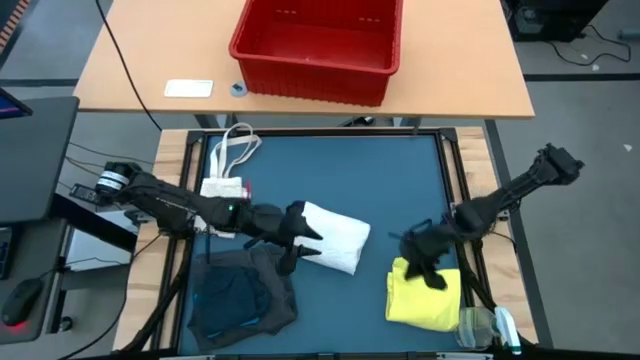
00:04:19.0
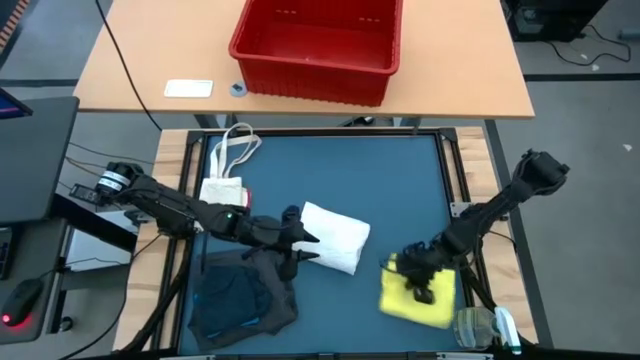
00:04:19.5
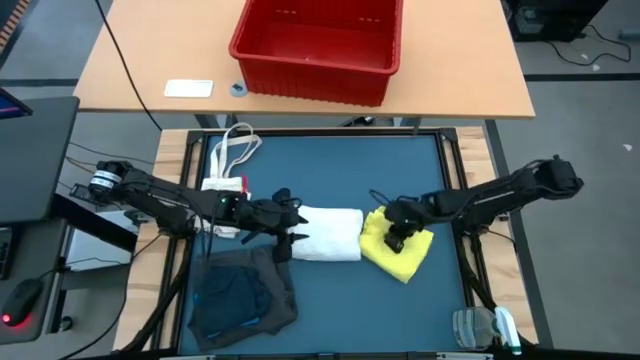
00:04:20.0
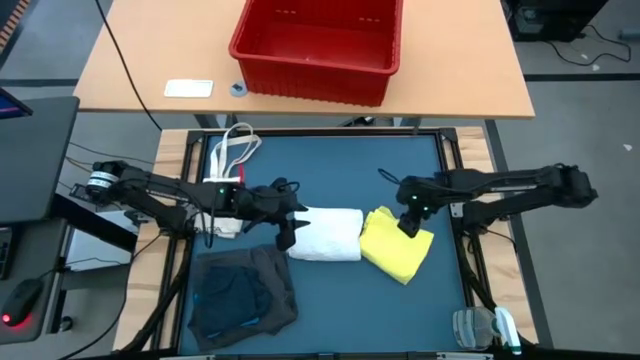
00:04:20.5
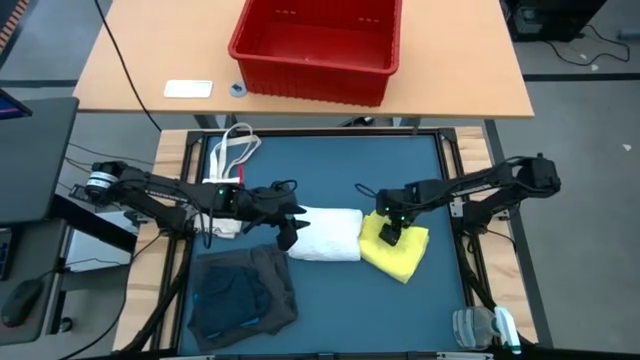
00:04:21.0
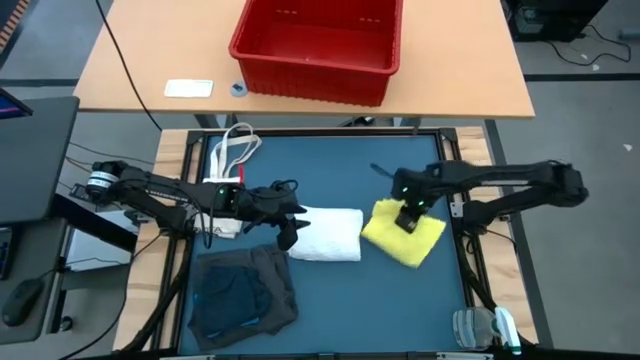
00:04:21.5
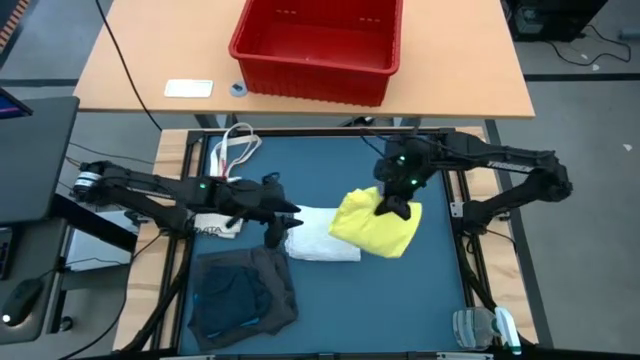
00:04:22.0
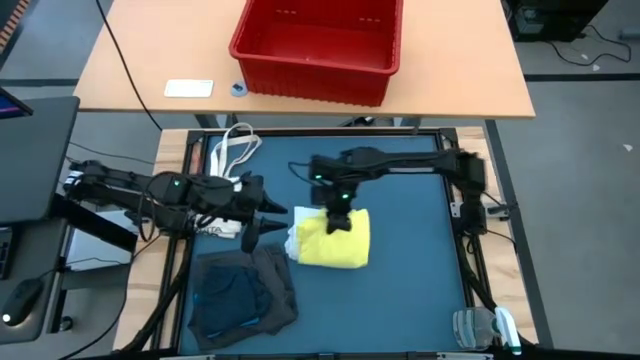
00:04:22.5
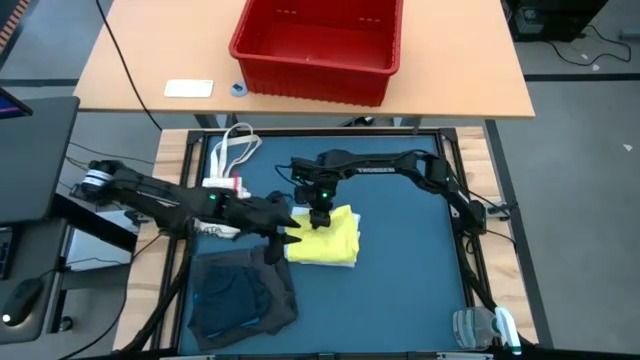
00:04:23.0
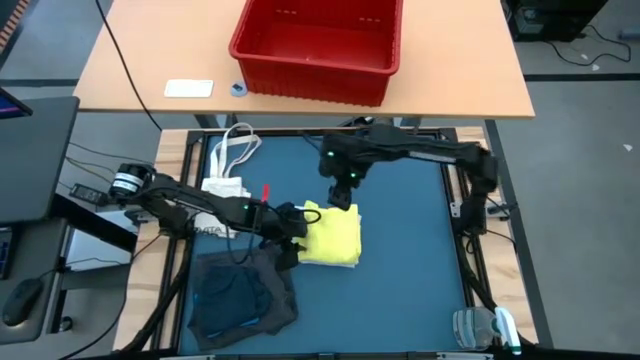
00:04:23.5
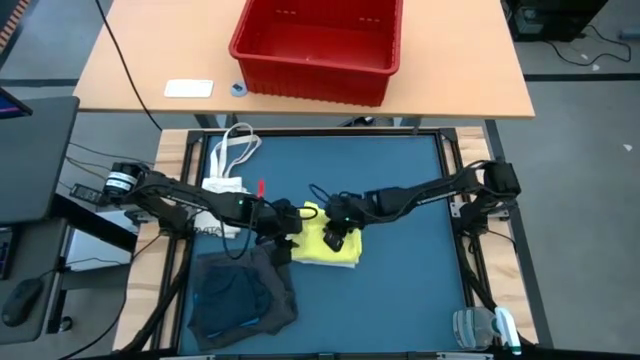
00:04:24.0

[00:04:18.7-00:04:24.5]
Task: Fold laundry
Stack the yellow shirt on top of the white shirt

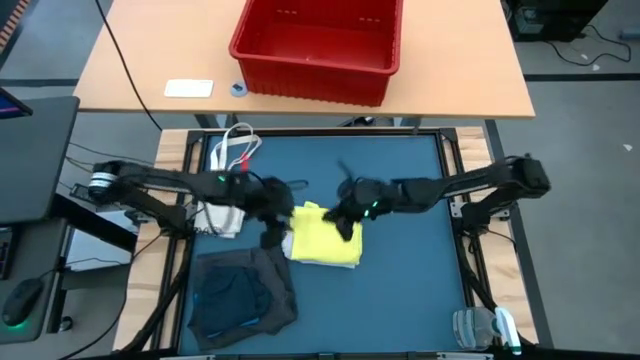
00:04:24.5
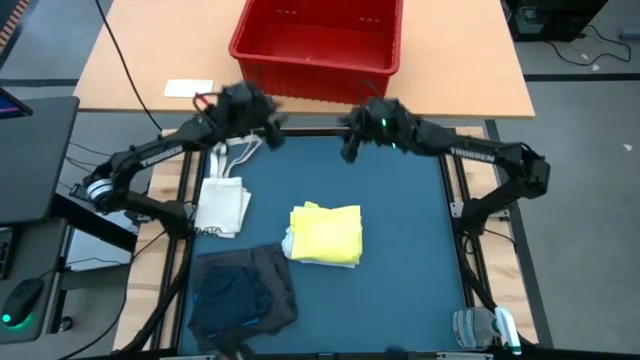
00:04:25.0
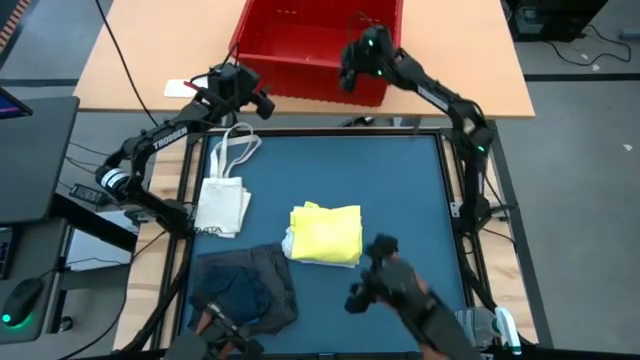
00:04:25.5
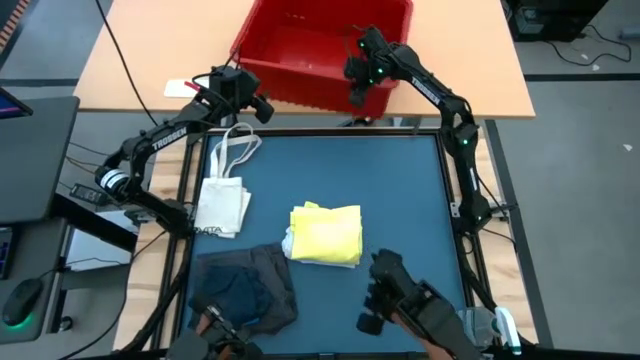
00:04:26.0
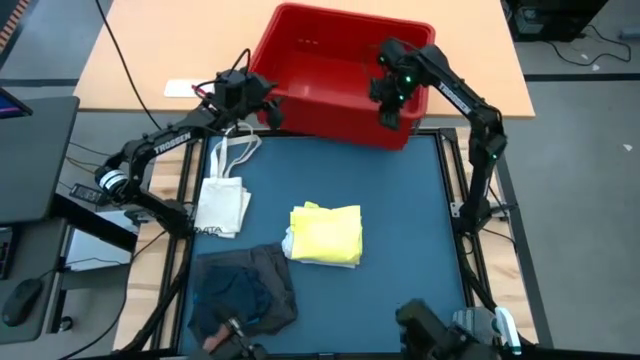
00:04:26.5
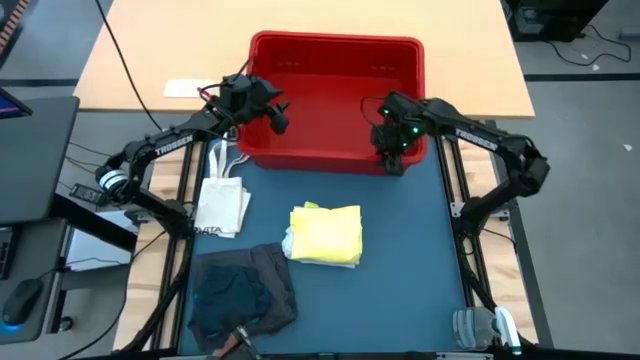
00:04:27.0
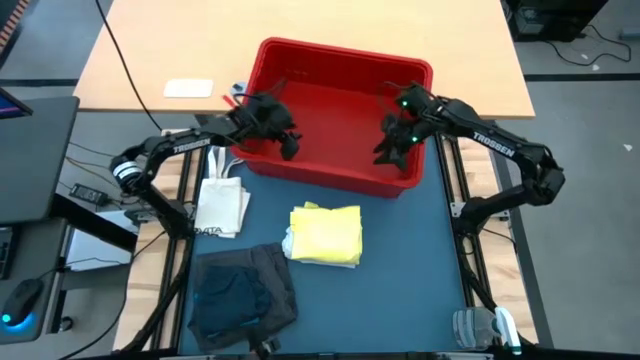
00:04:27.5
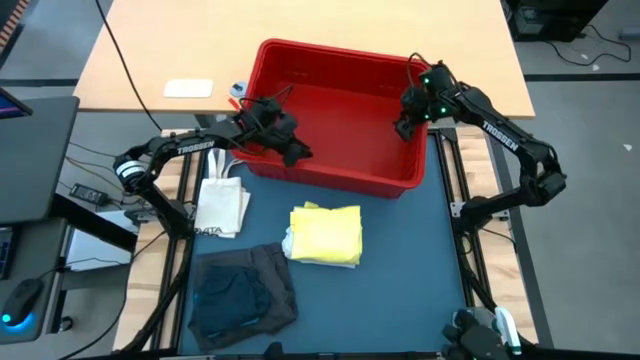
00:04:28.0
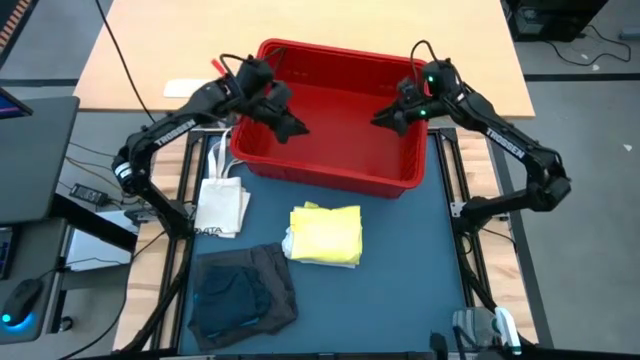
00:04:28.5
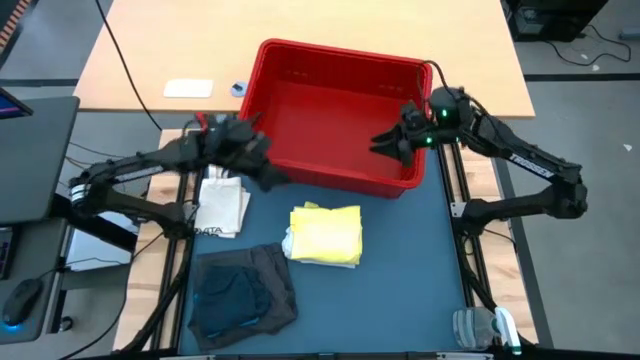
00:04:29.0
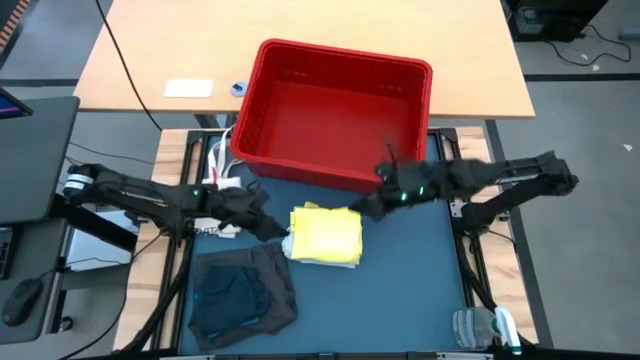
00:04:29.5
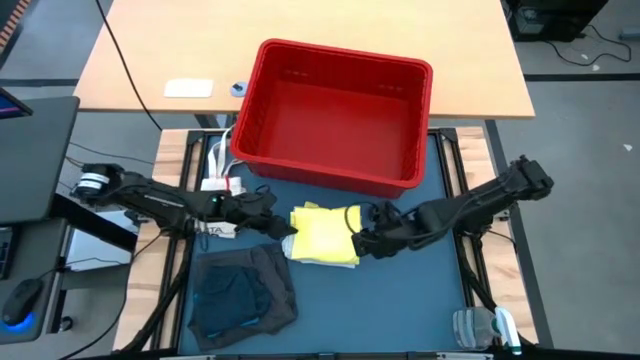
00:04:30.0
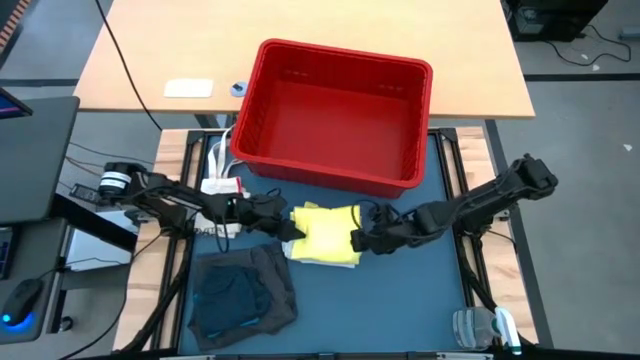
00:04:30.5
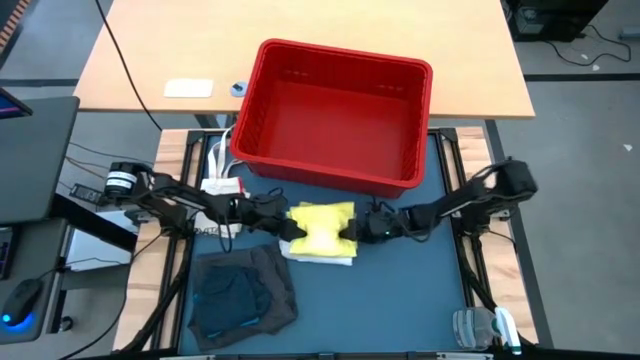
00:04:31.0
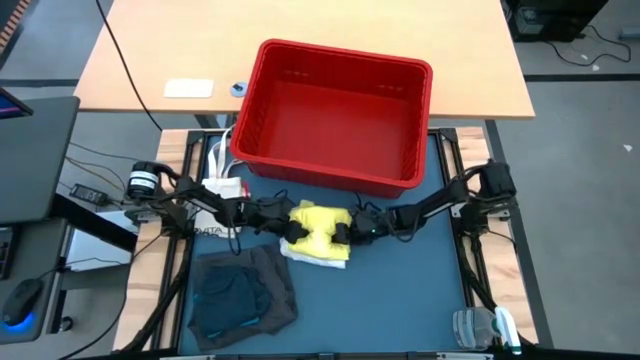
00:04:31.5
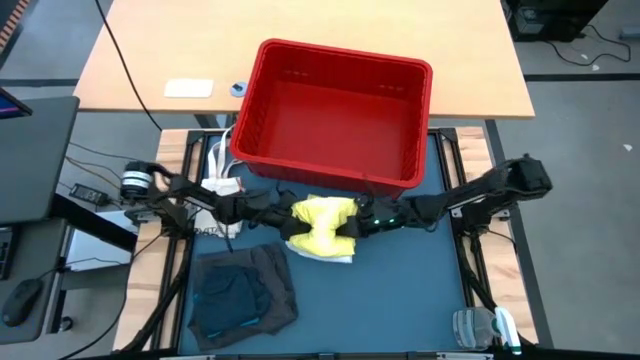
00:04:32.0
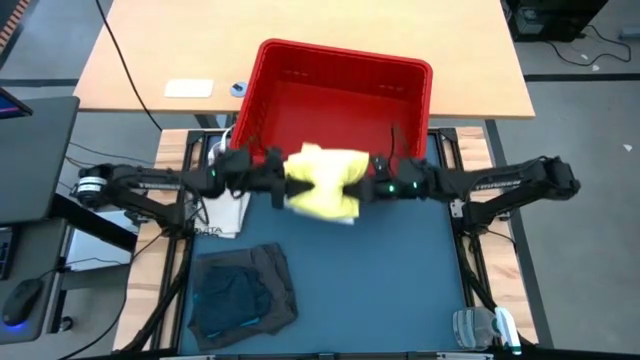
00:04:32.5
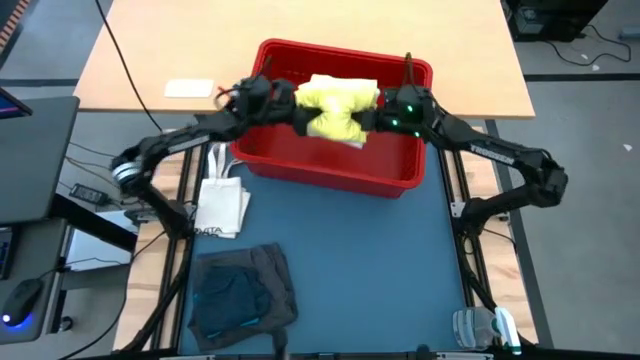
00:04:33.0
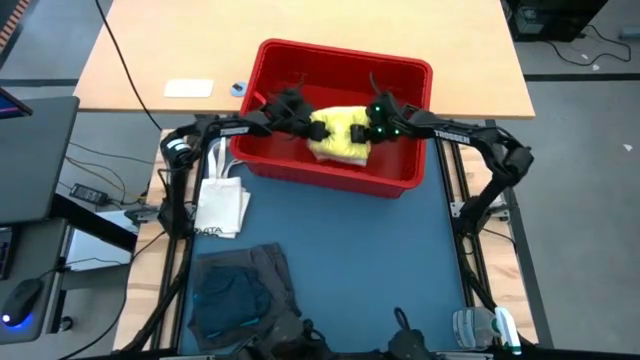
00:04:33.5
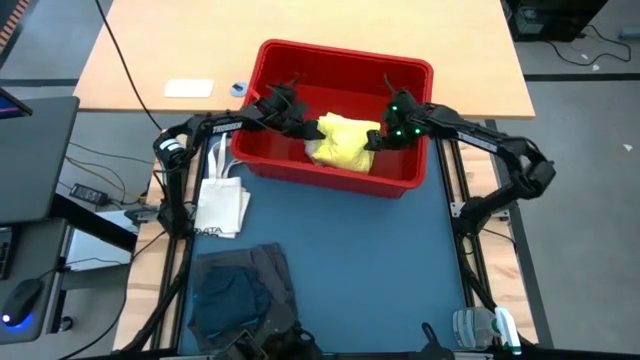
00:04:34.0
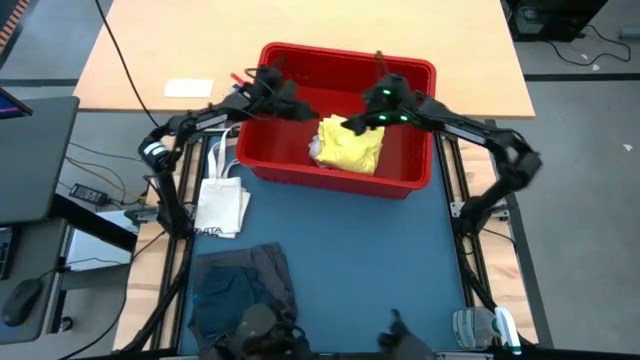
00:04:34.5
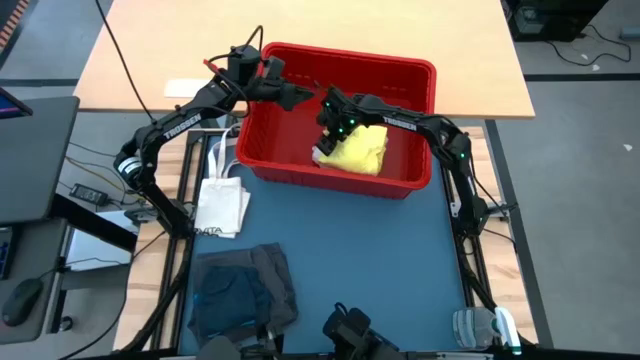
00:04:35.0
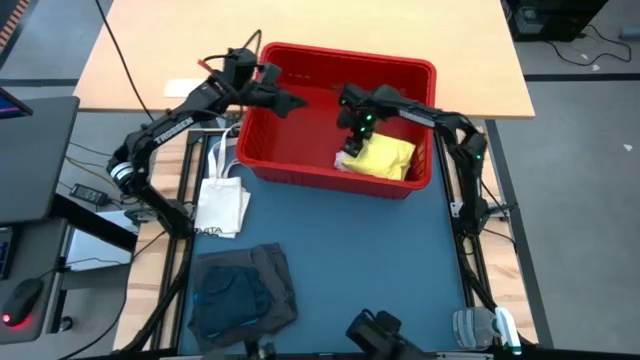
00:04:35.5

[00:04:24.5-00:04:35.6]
Put the folded shirts into the red bin

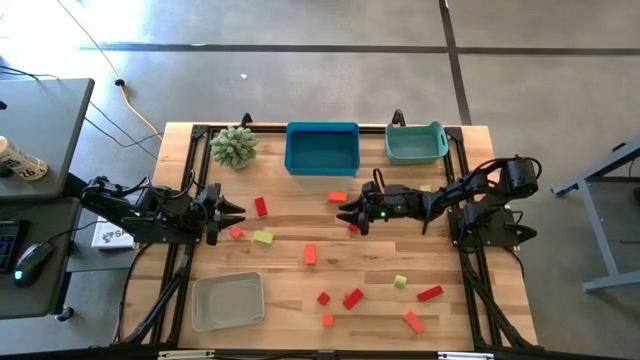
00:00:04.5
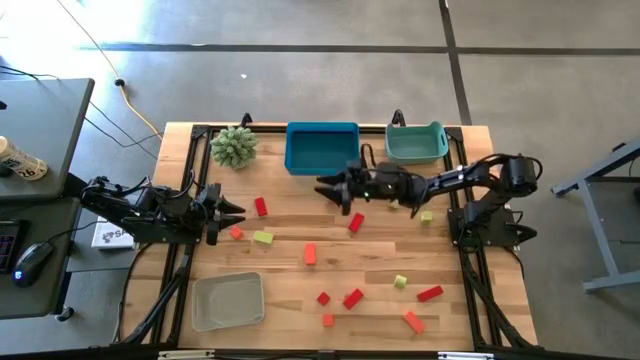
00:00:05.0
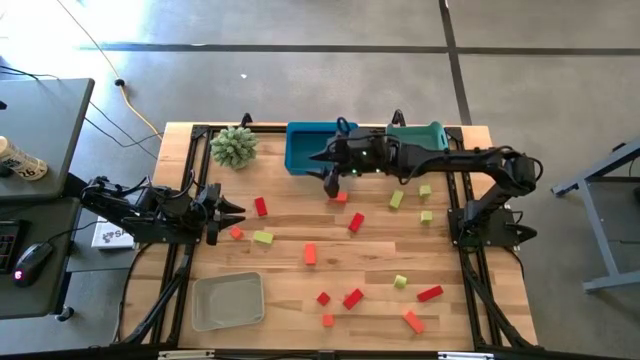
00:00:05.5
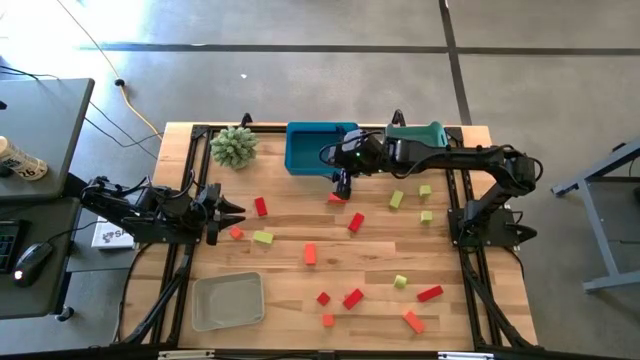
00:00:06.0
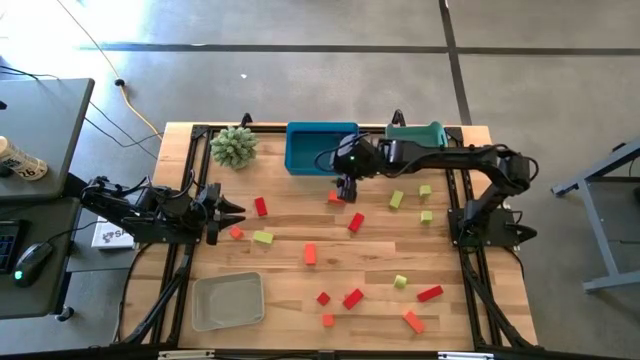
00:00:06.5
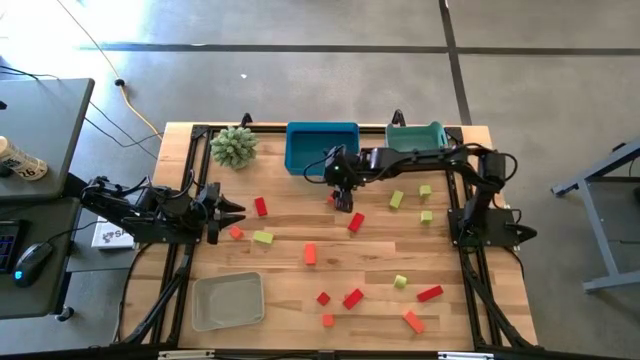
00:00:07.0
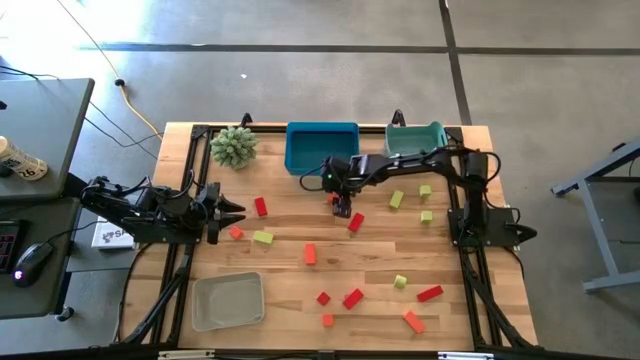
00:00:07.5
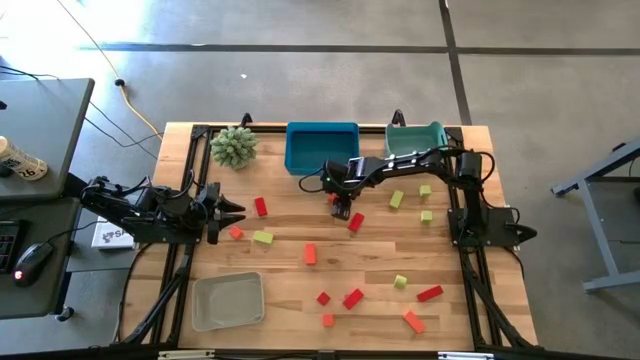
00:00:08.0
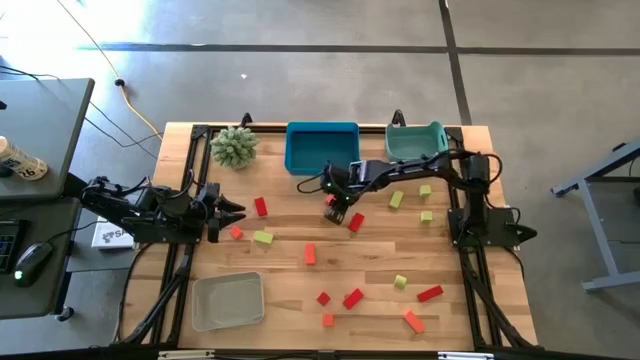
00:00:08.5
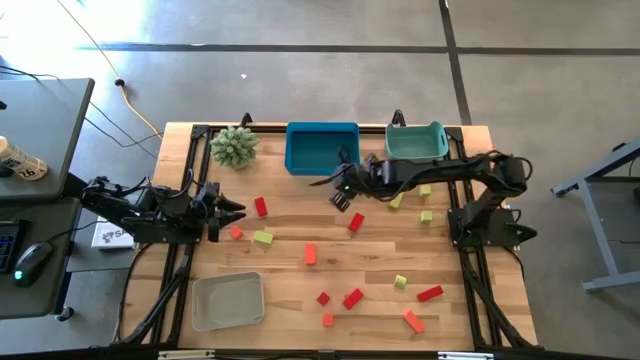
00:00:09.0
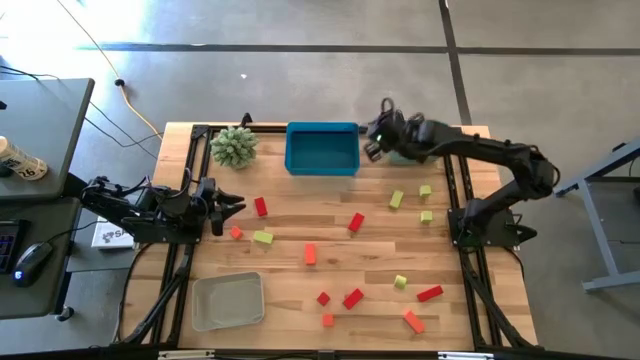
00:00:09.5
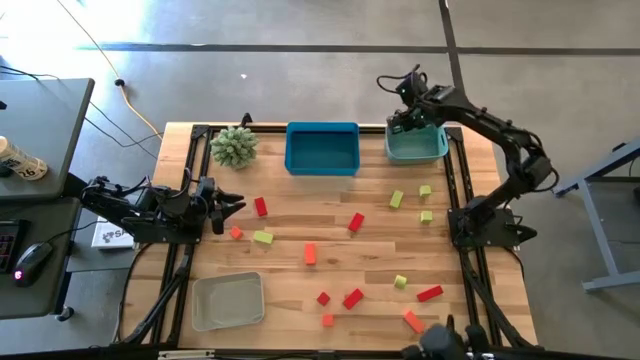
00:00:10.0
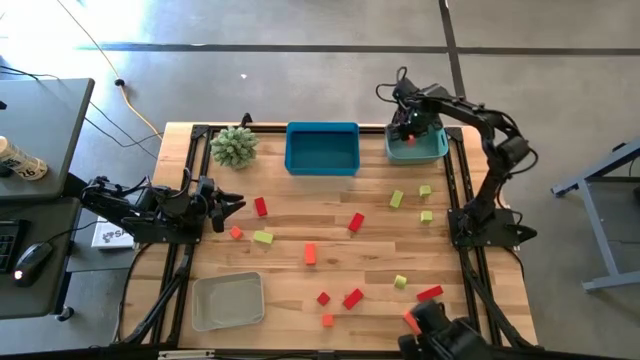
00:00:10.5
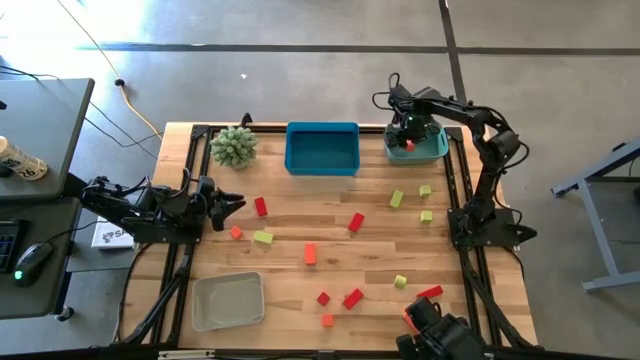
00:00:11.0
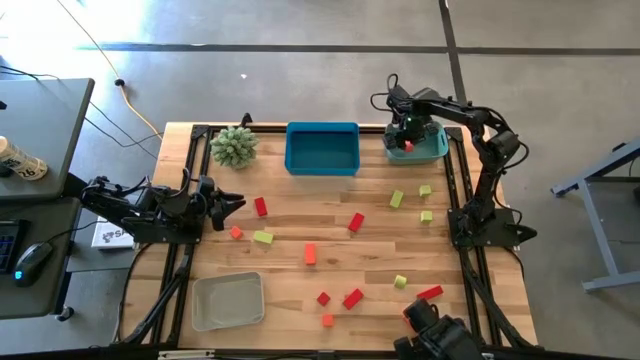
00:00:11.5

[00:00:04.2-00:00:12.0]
Task: Sort & place blocks by color
Put the orange block into the green bin
